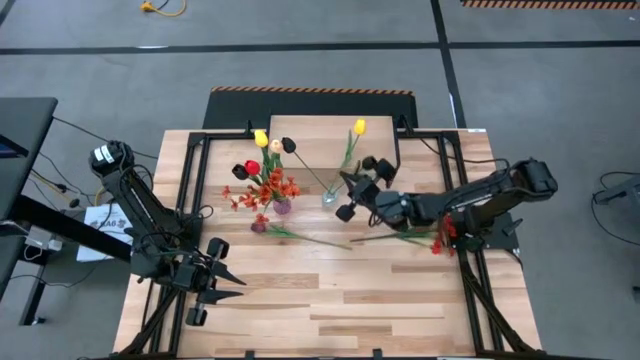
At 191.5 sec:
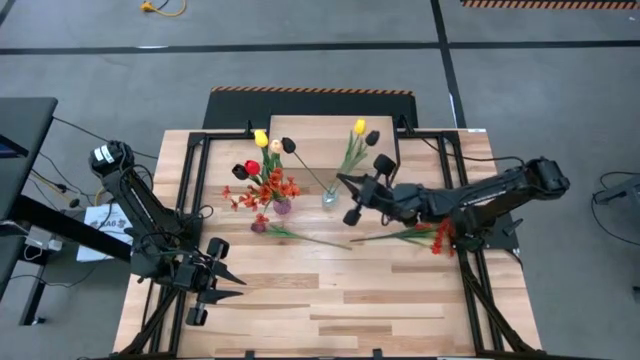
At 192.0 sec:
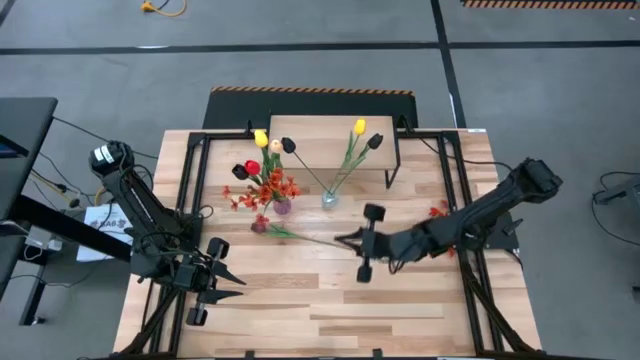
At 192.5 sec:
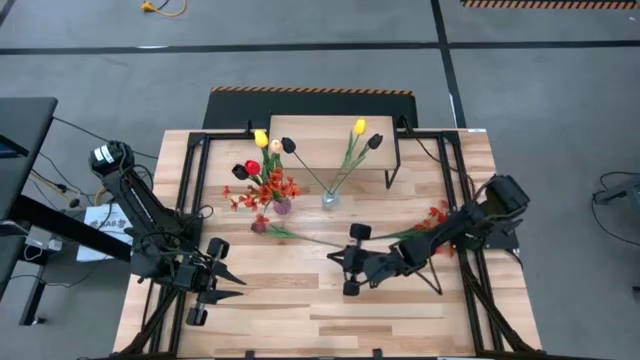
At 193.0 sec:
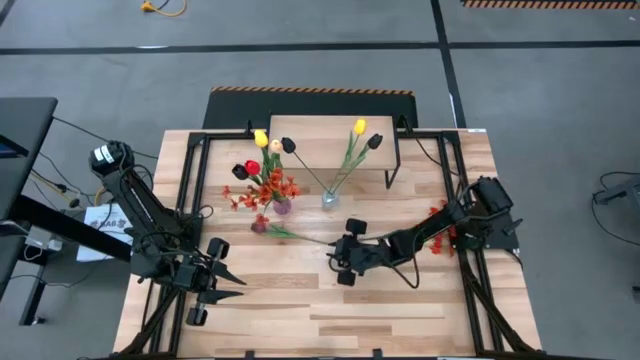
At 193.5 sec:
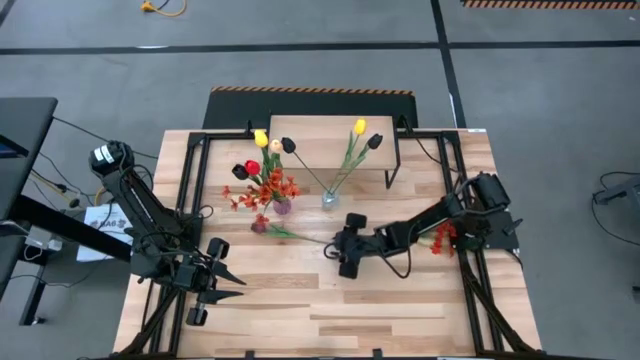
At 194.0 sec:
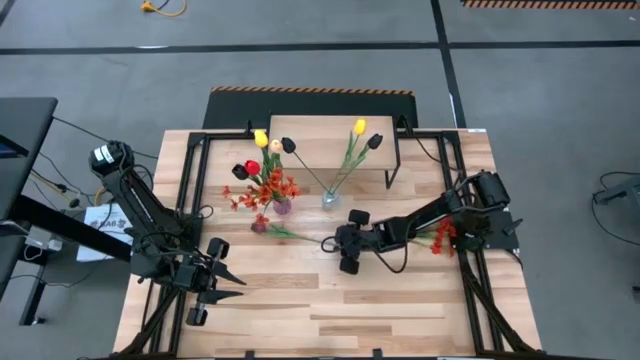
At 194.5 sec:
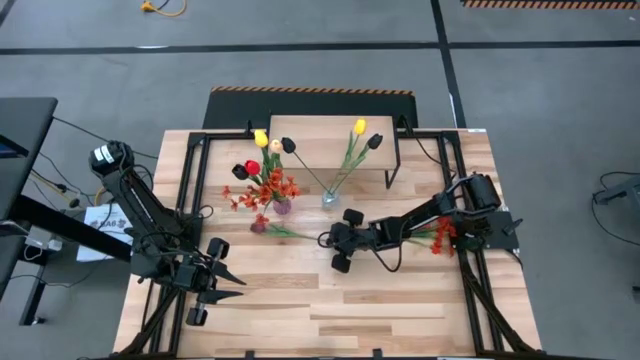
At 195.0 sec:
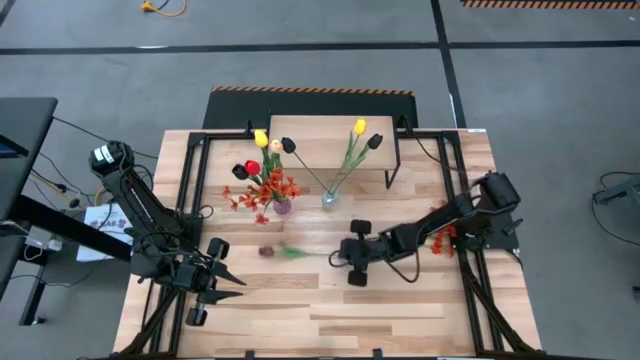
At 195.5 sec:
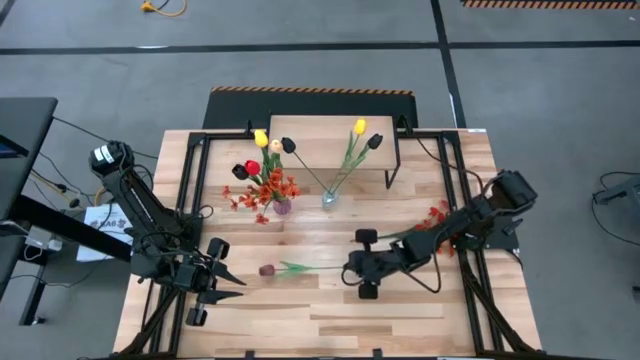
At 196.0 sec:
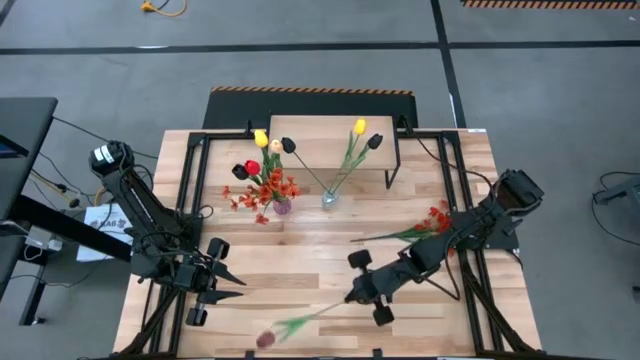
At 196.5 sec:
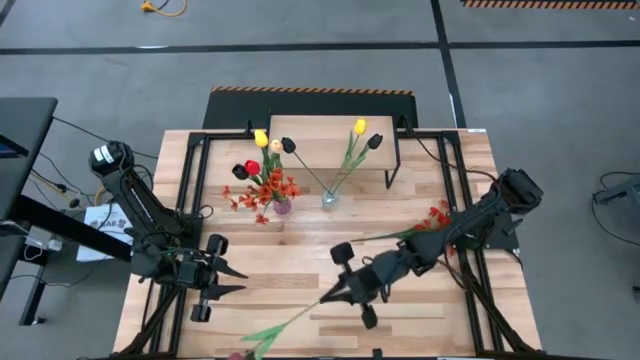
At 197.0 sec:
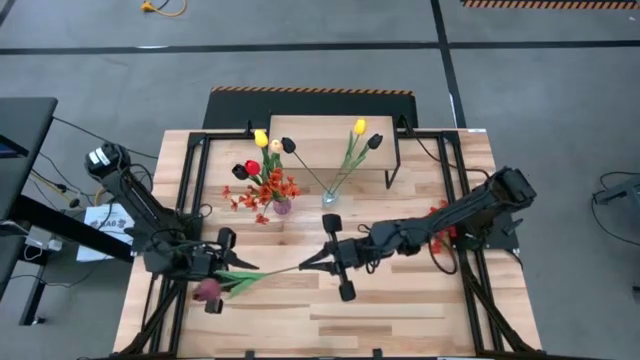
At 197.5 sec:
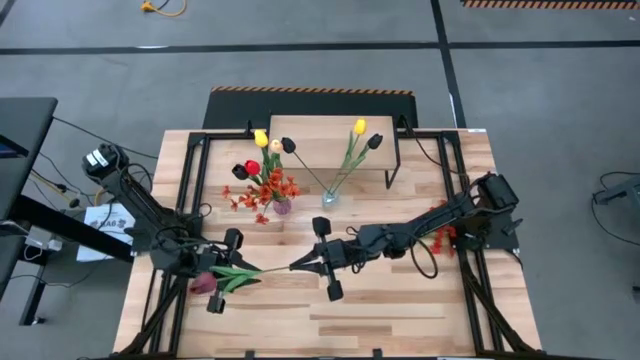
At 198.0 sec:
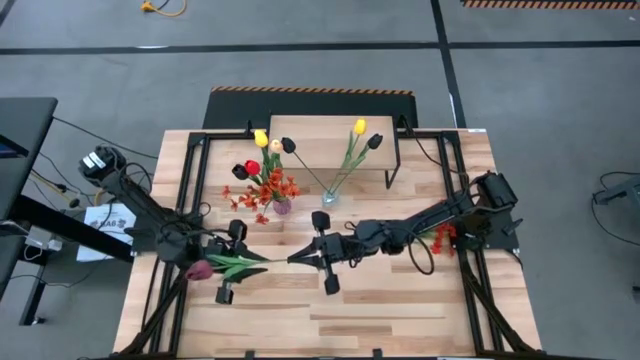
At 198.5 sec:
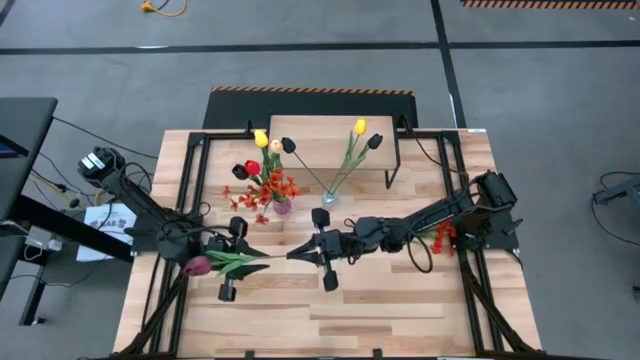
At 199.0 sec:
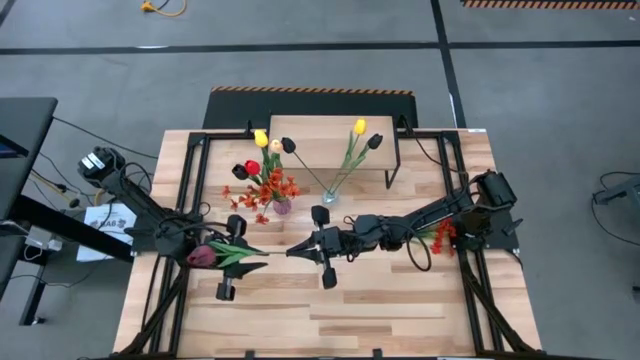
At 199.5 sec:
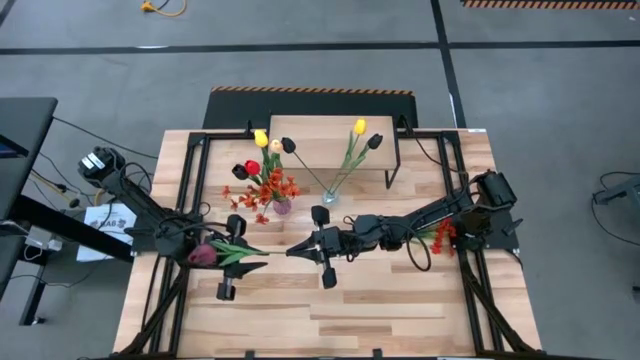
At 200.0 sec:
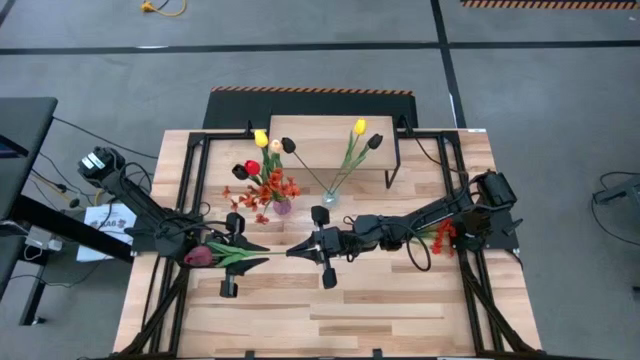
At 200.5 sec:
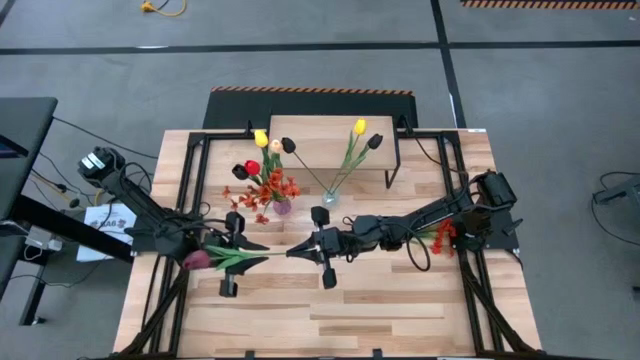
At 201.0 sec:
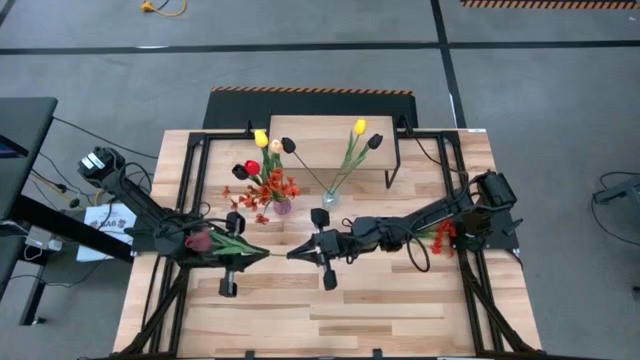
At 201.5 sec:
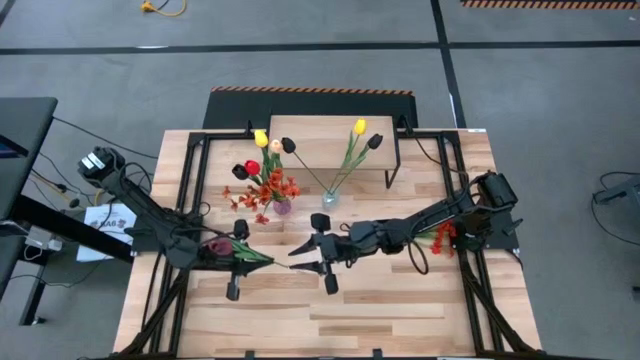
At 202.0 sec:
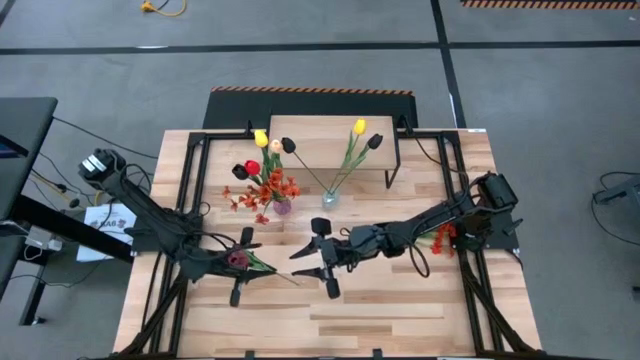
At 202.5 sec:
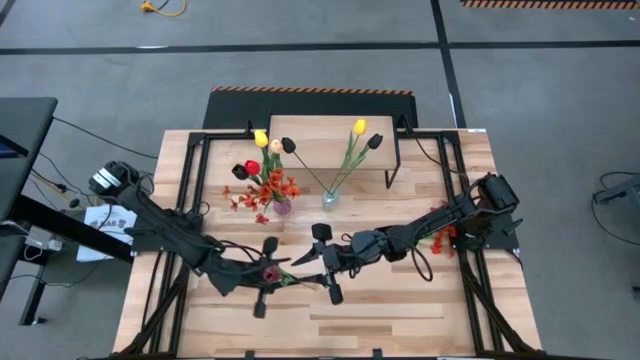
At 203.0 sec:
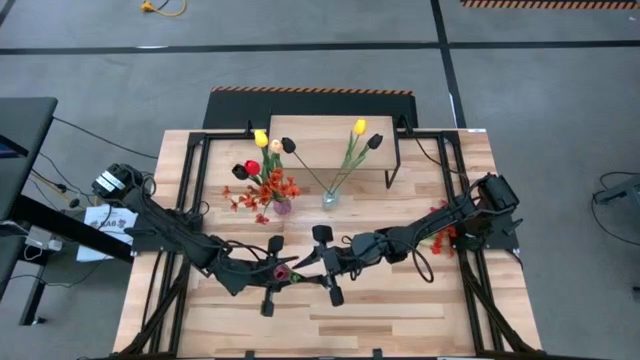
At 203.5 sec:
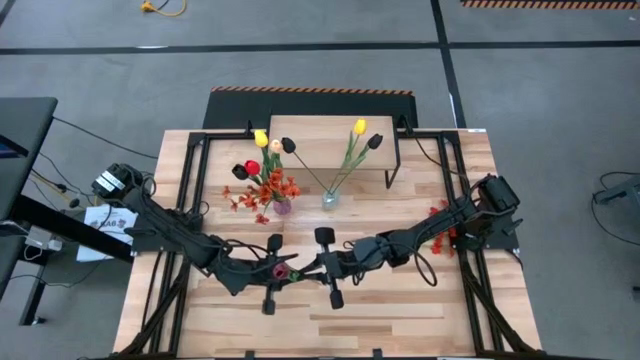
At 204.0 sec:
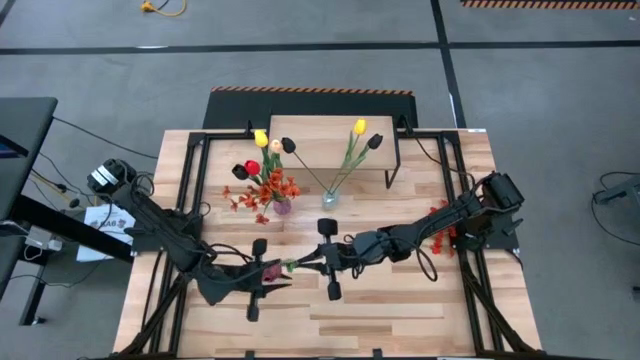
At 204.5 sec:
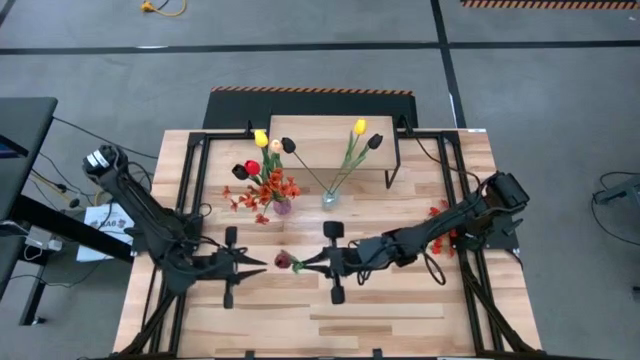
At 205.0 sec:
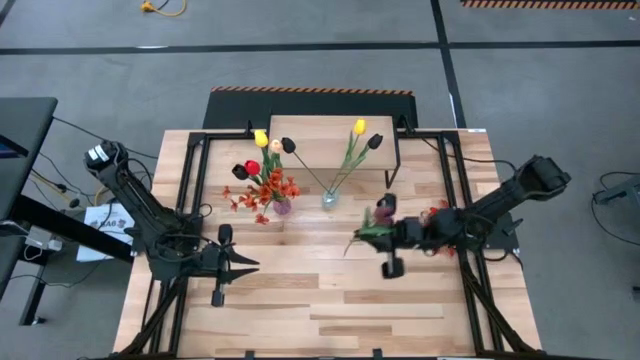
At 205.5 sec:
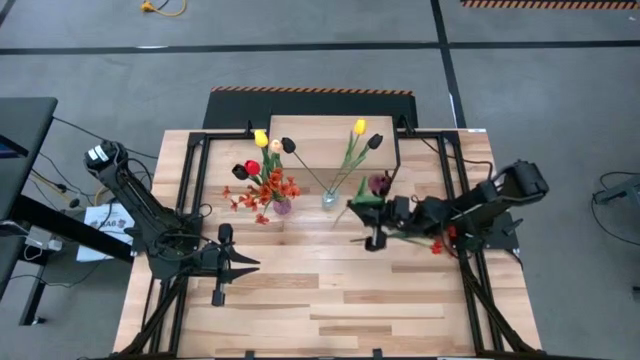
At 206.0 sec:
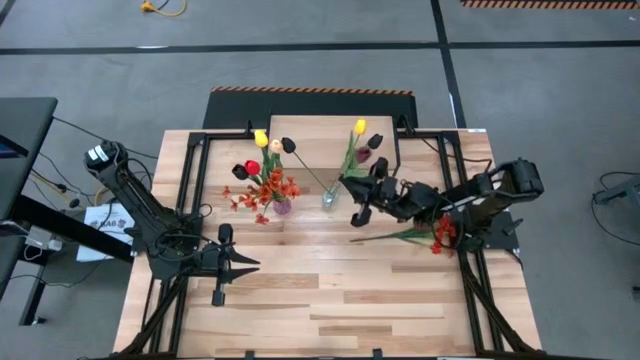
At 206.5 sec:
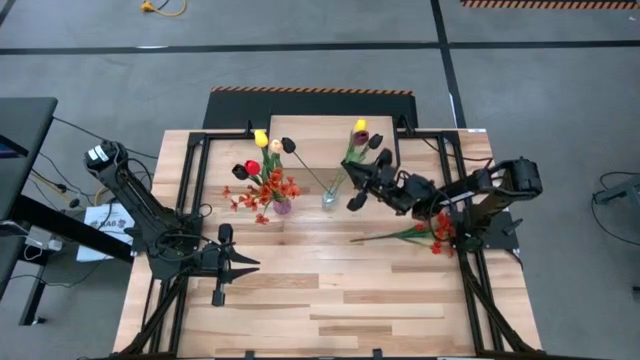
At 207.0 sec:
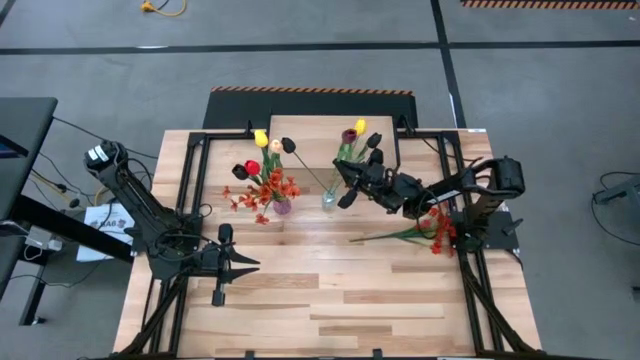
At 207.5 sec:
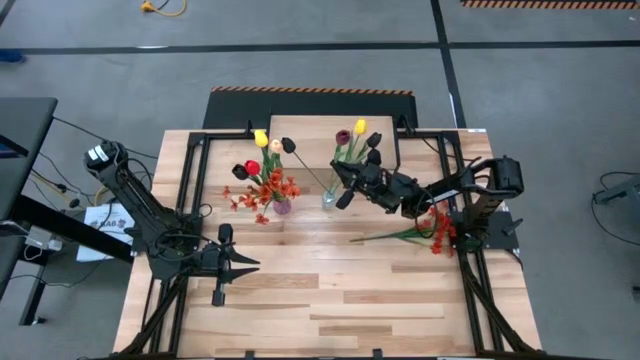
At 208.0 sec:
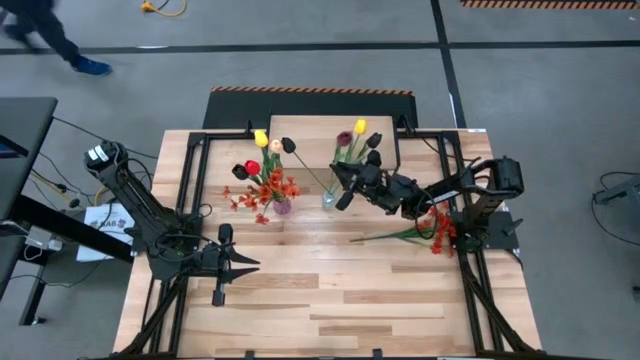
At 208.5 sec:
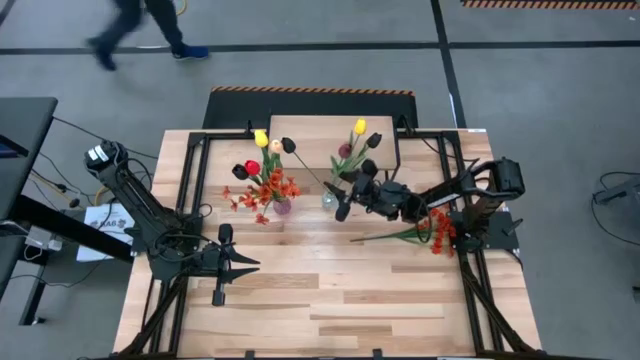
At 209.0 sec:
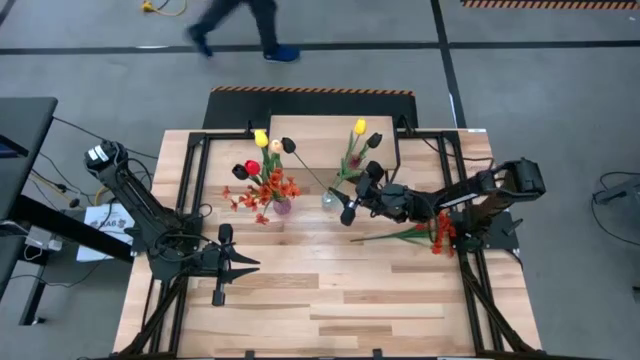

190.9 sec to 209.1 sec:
Task: Pick and place flowers into a vace then onto a shelf
Put the violet tulip into the transparent vase

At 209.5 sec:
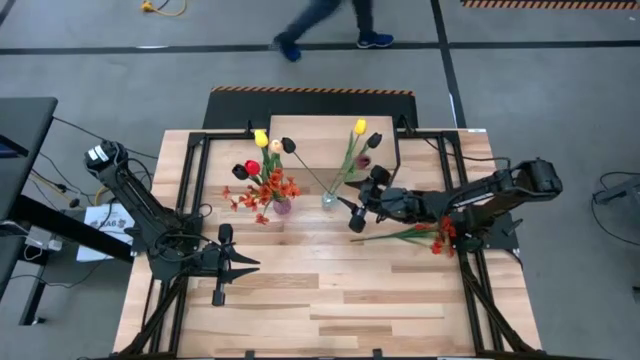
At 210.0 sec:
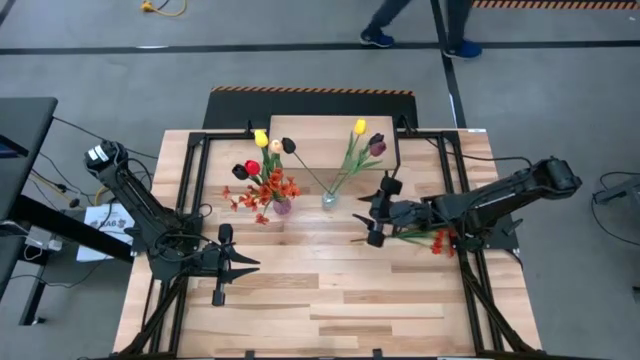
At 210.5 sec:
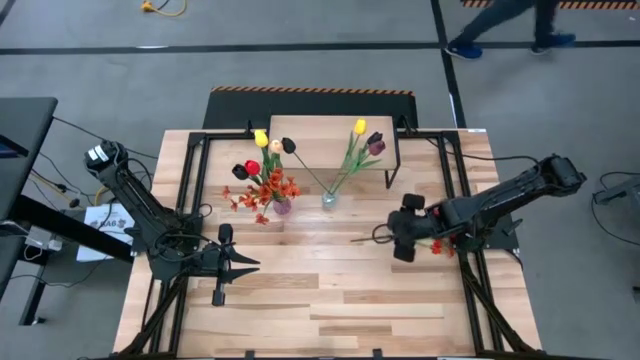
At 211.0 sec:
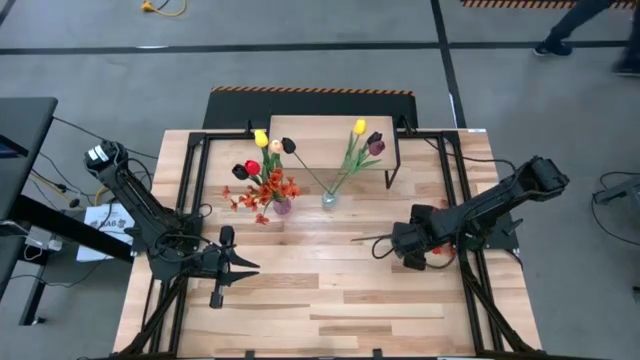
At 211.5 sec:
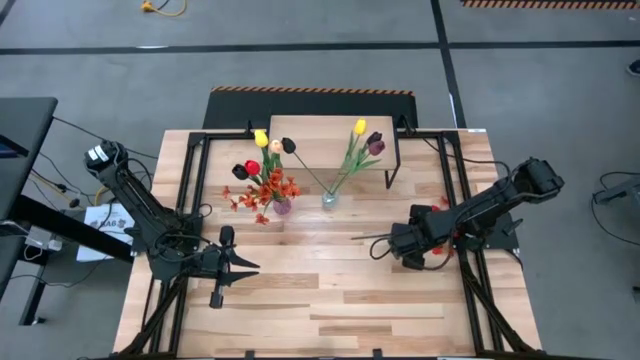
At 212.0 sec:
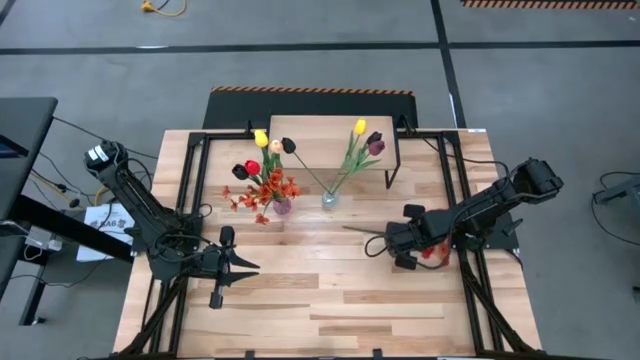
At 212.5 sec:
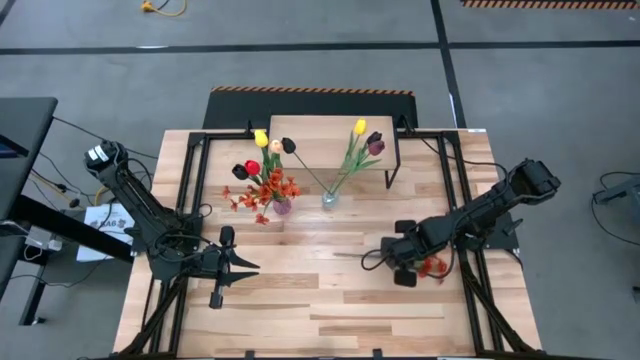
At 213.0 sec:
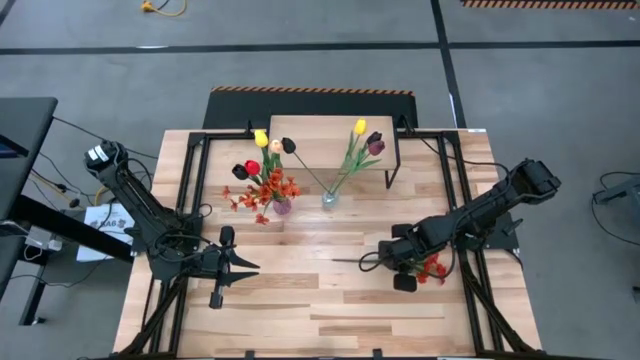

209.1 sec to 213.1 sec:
Put the orange flower into the transparent vase
